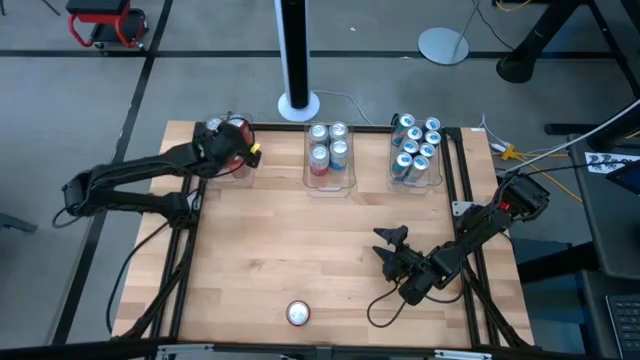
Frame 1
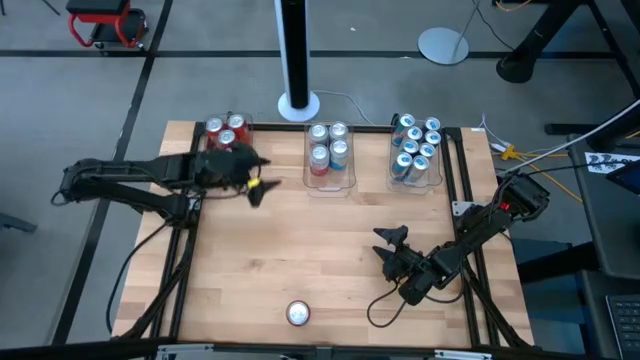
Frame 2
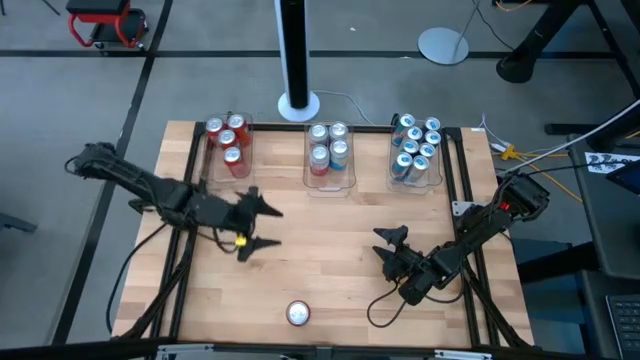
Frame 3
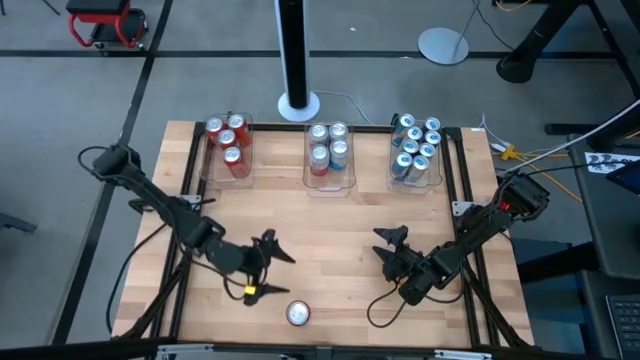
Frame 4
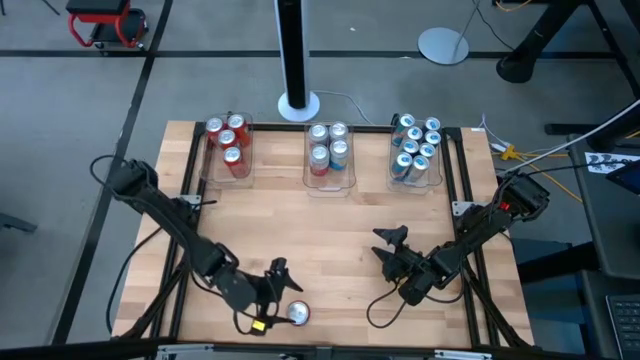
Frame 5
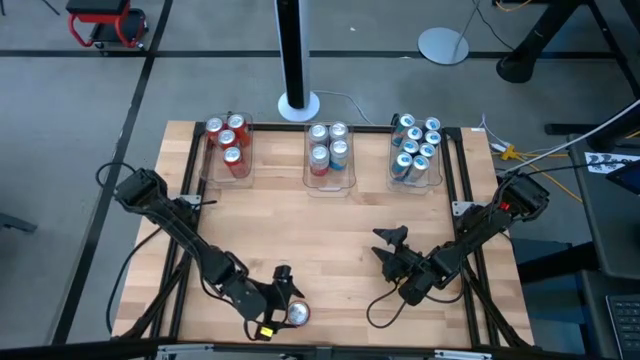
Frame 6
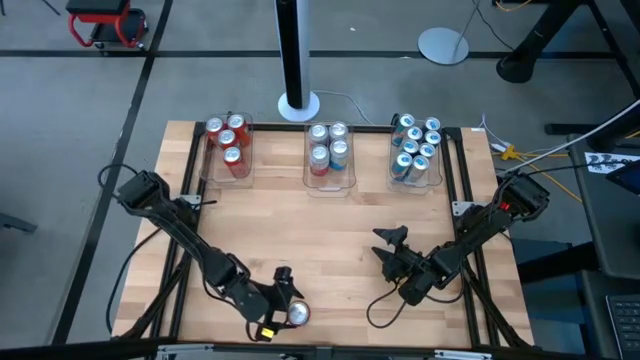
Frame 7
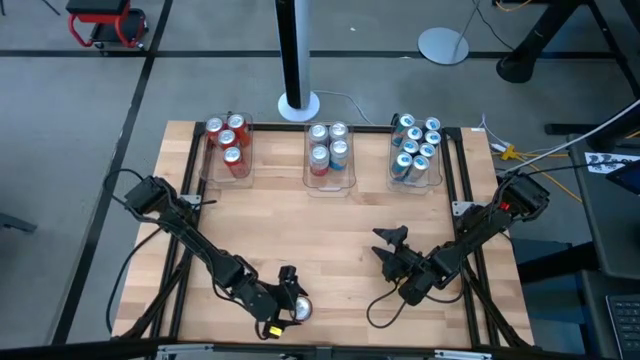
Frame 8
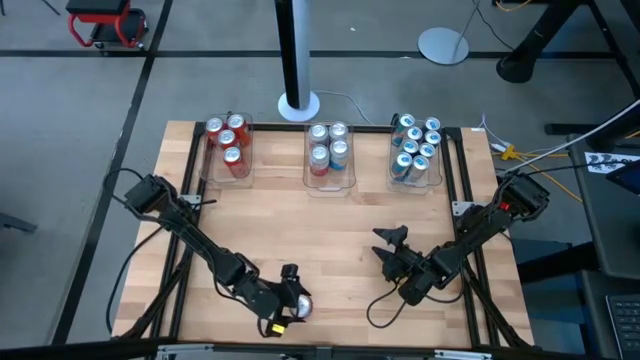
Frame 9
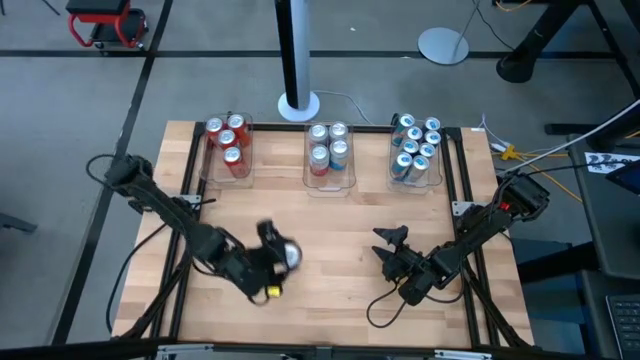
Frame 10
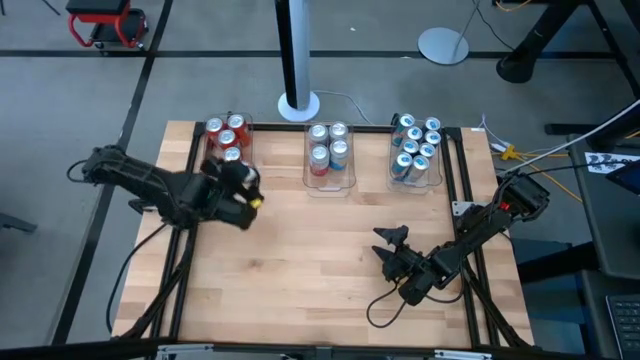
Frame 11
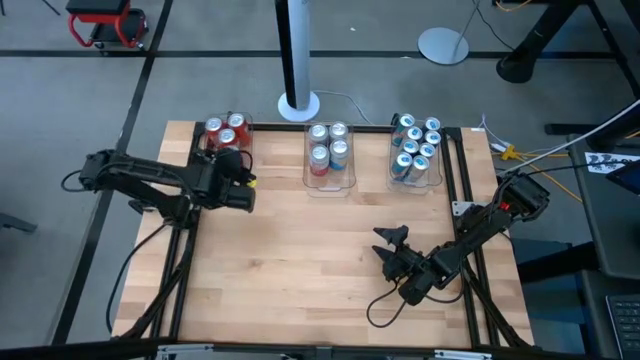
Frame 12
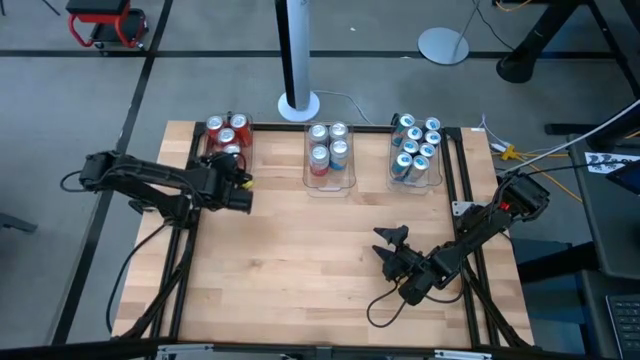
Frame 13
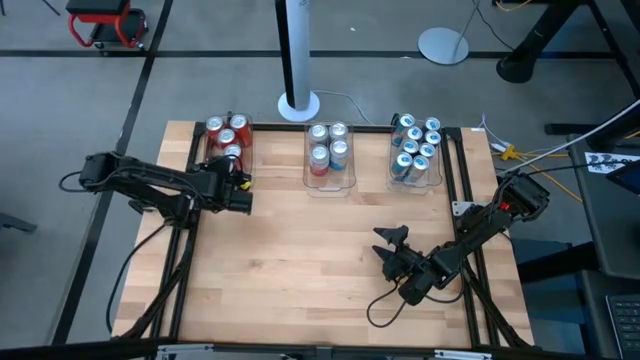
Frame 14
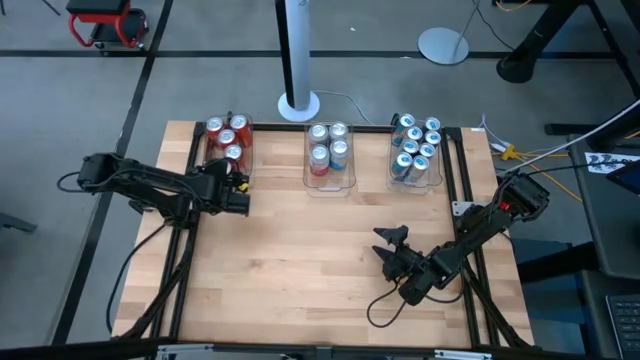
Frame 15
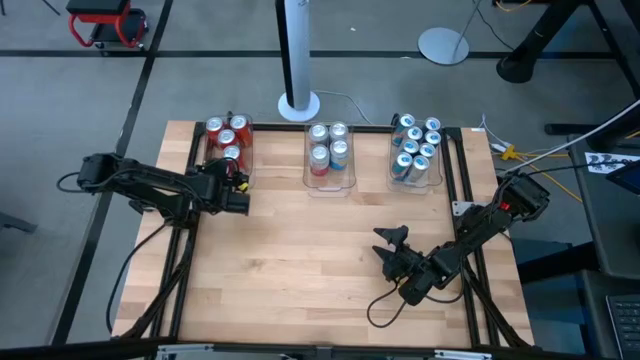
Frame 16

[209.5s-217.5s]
Task: Sort soda cans
Put the red soda can into the top left transparent bin

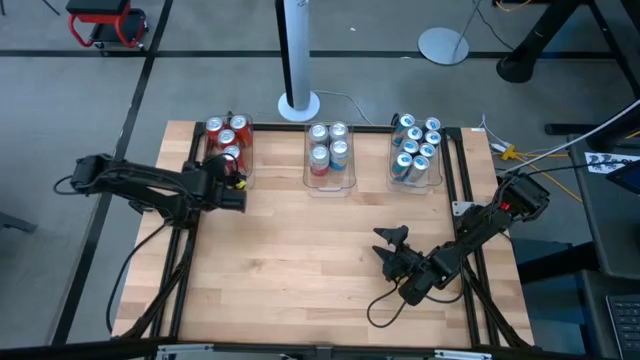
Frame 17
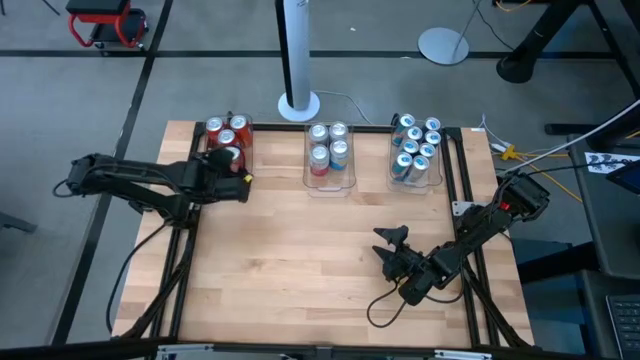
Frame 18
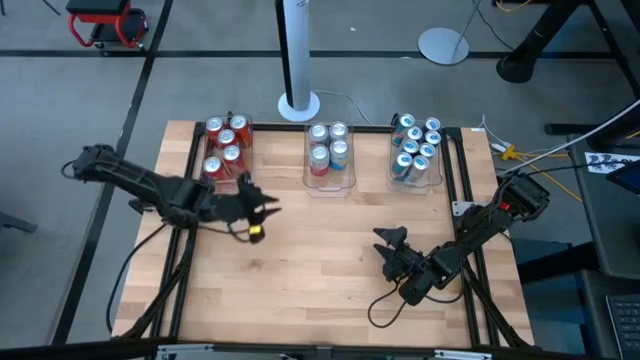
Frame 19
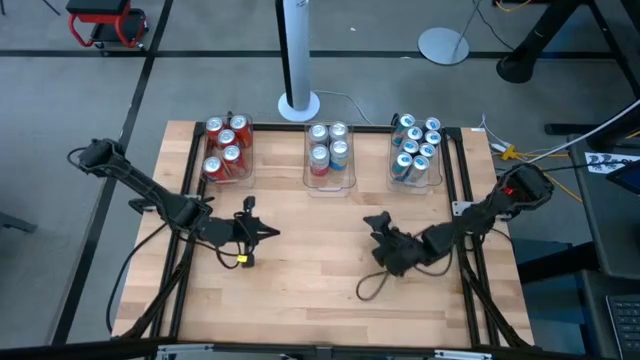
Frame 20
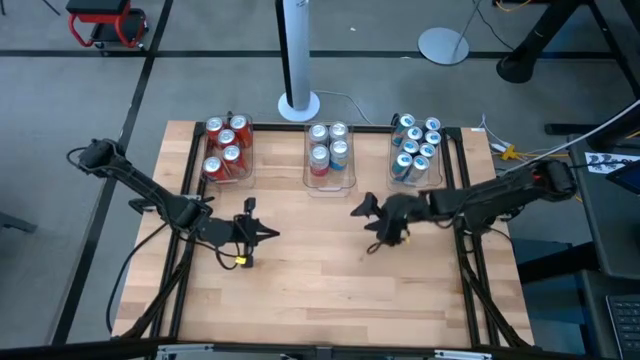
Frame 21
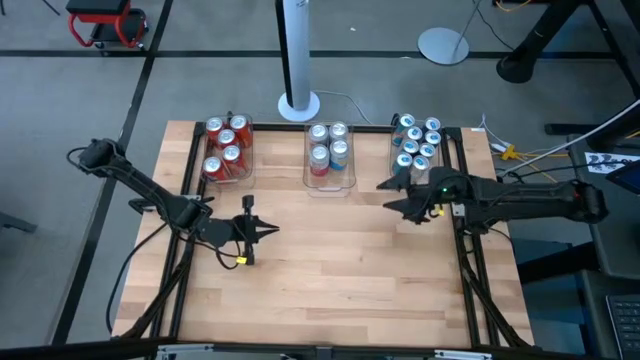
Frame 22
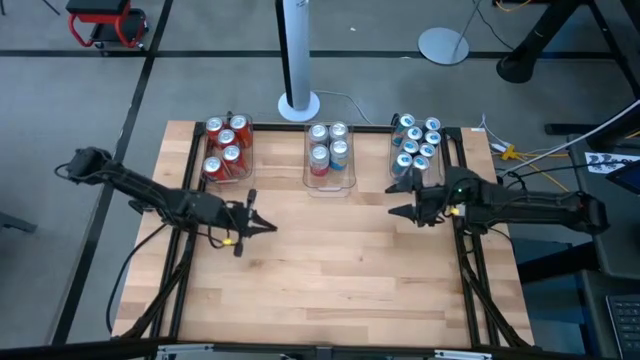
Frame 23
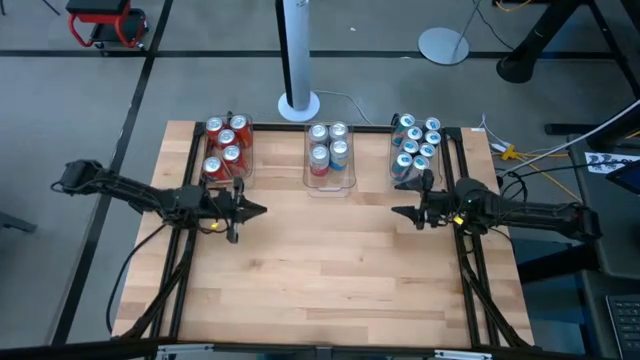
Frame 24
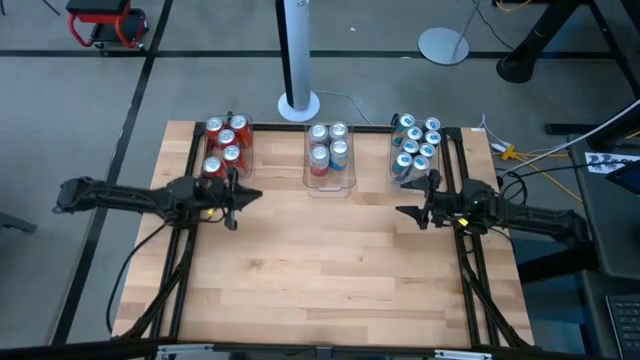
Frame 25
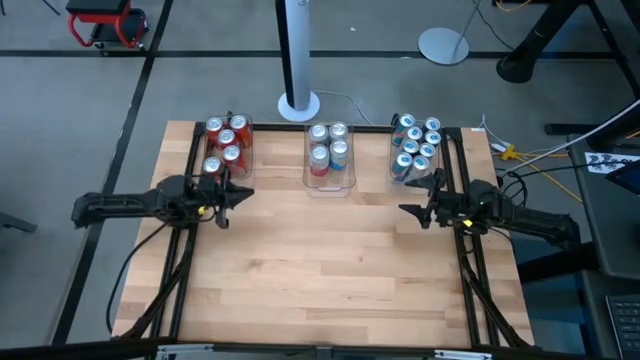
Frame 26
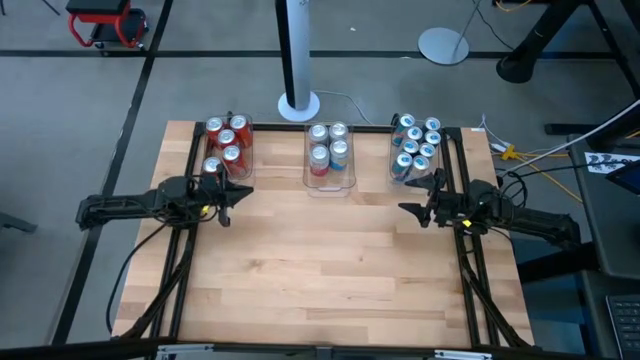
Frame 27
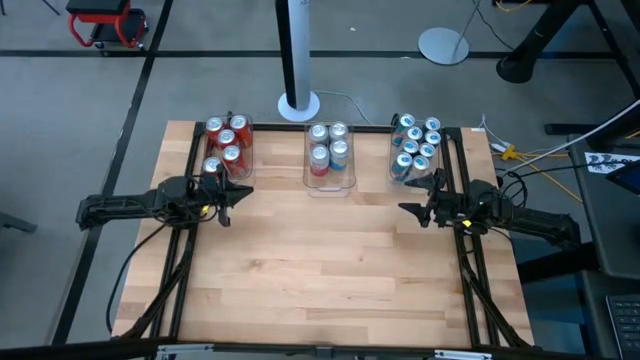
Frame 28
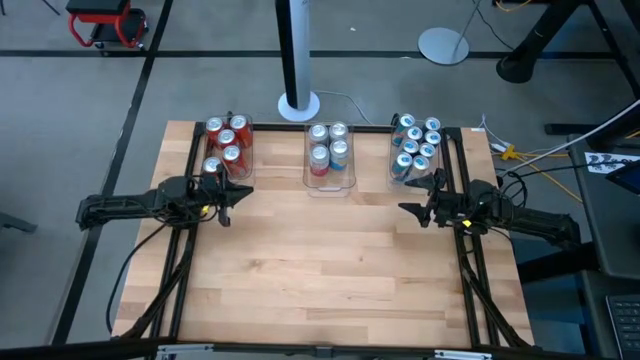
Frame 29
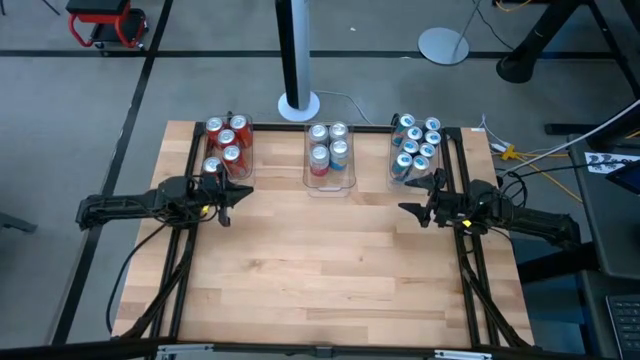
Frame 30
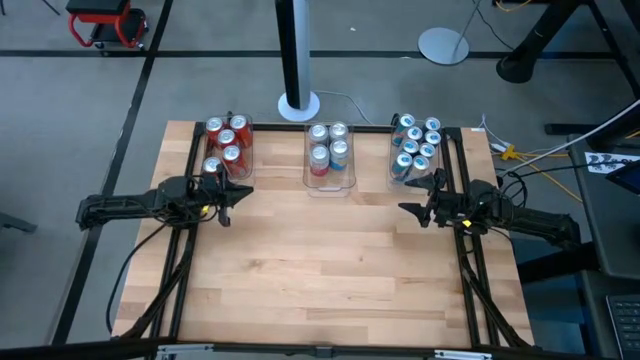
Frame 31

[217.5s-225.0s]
Return to Home Position

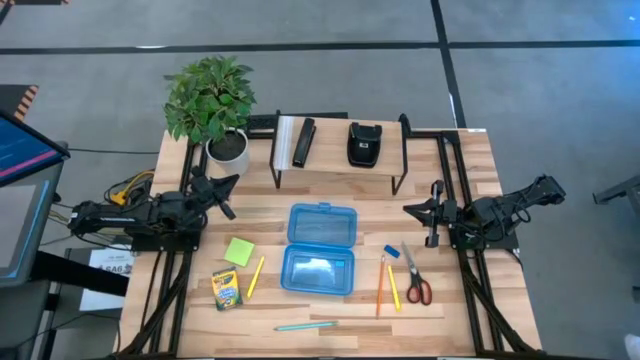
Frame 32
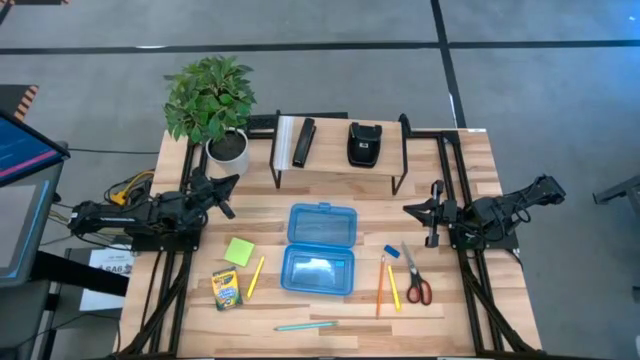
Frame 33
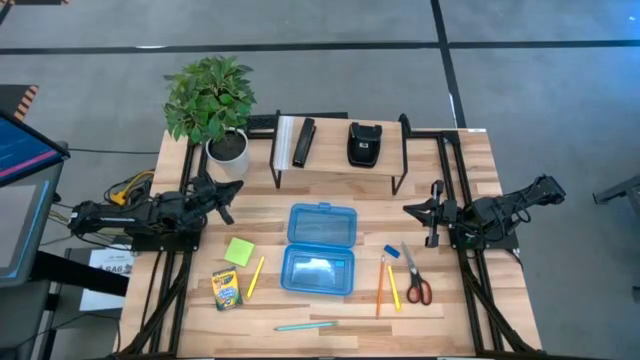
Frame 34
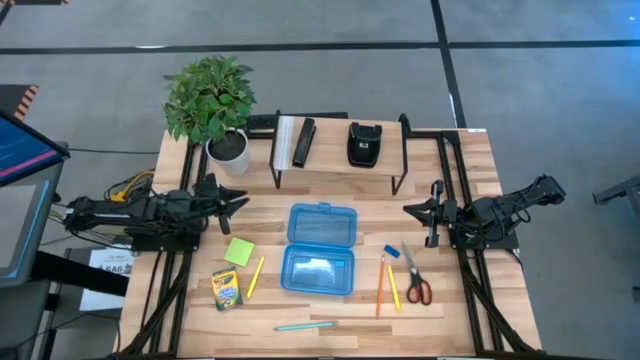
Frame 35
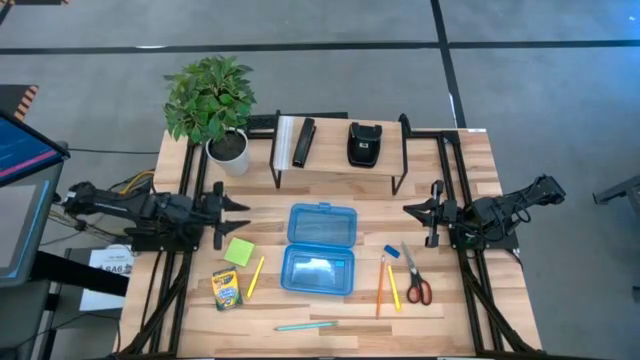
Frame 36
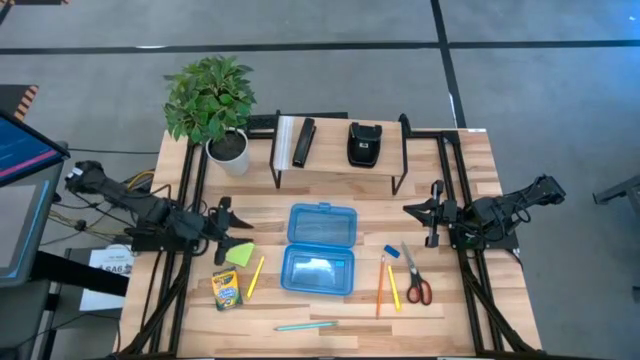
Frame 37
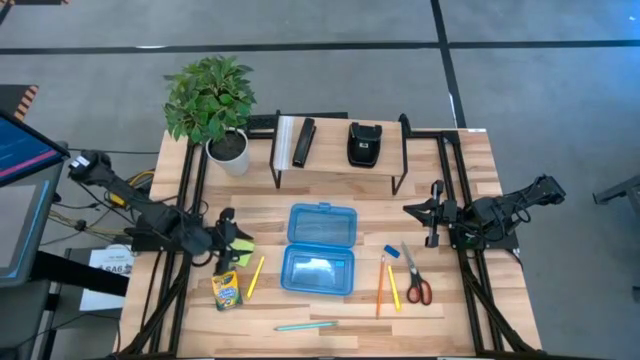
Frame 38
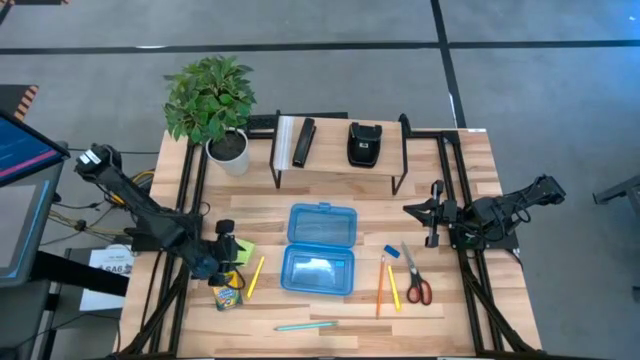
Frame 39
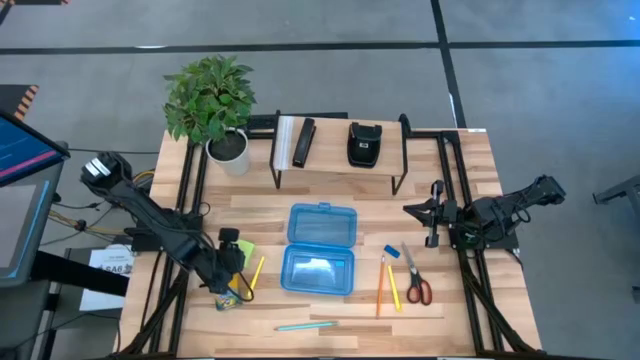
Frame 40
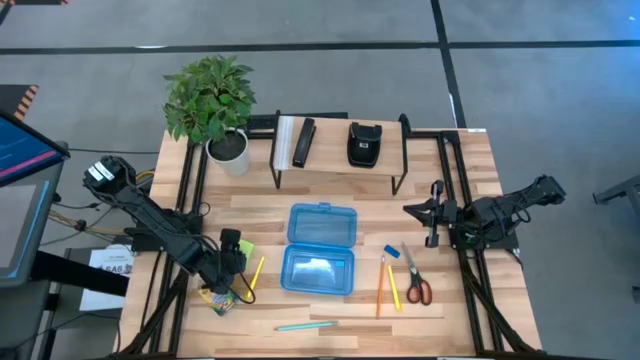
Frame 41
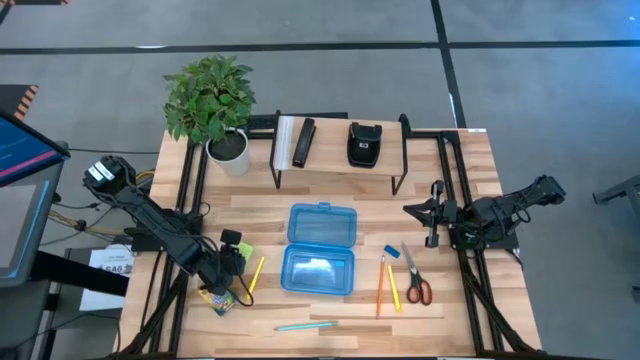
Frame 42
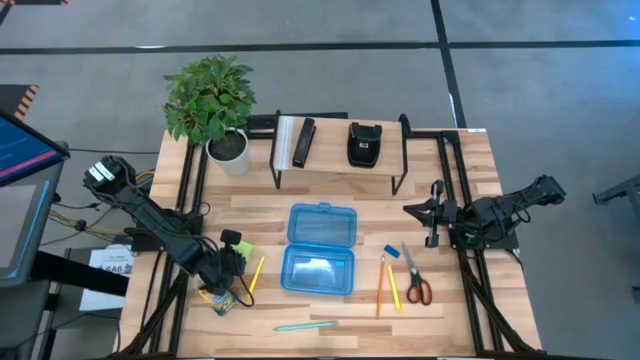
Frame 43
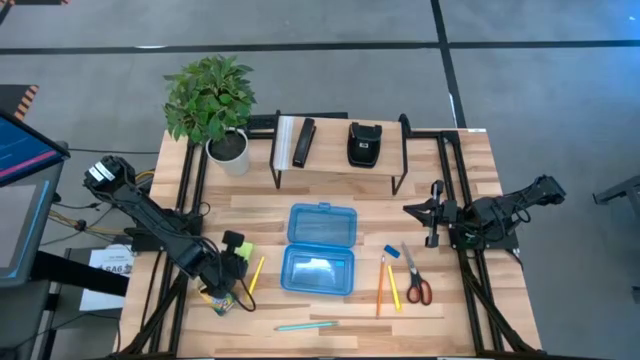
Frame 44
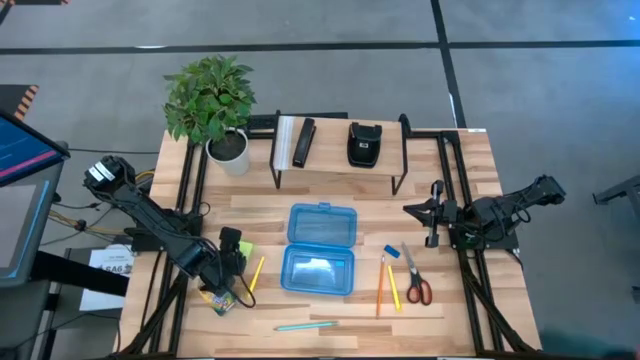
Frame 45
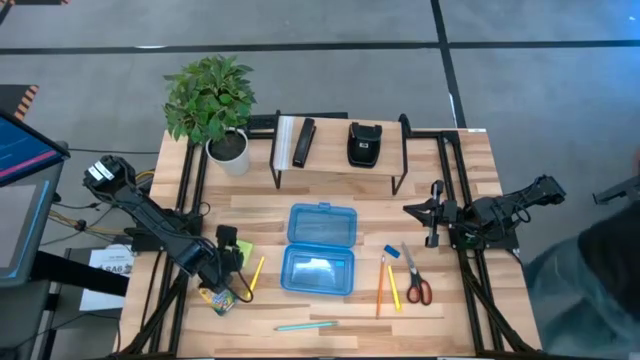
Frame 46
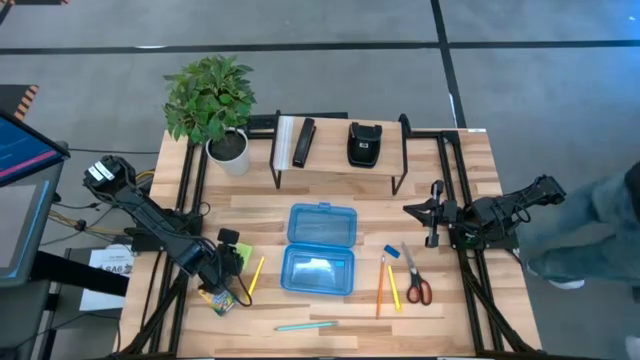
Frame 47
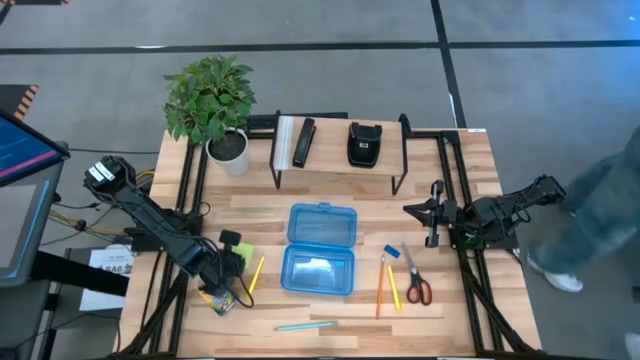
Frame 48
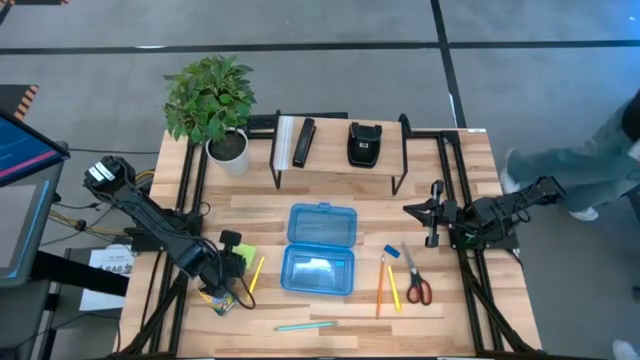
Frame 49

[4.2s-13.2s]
Task: Pack school essentials
Put the green sticky notes into the blue supply box
